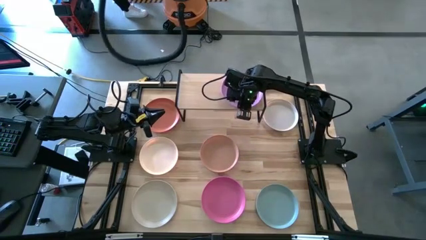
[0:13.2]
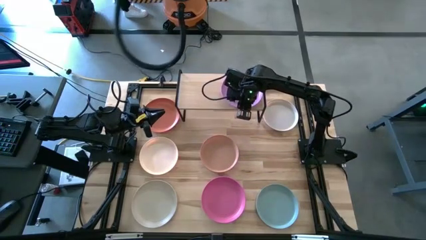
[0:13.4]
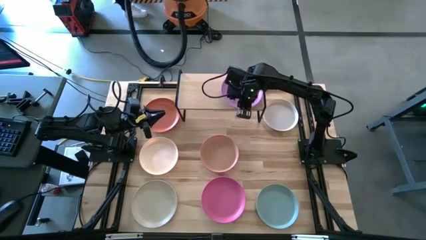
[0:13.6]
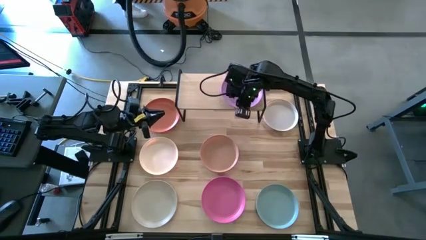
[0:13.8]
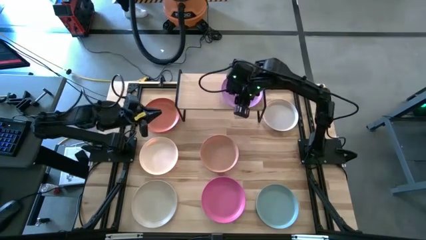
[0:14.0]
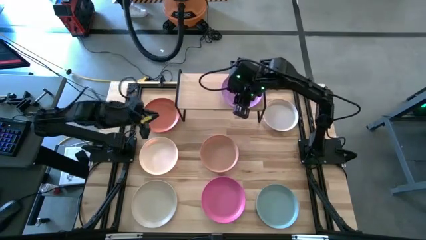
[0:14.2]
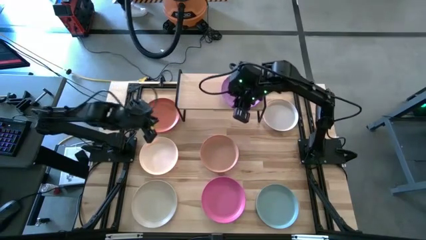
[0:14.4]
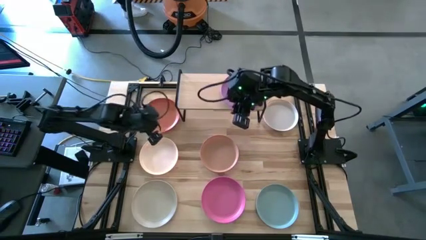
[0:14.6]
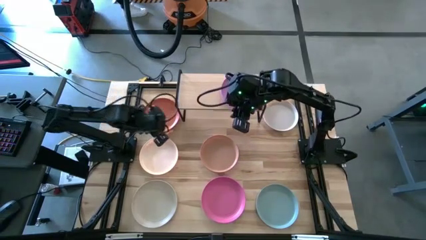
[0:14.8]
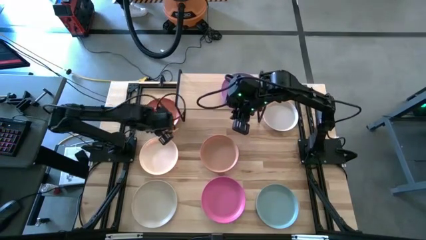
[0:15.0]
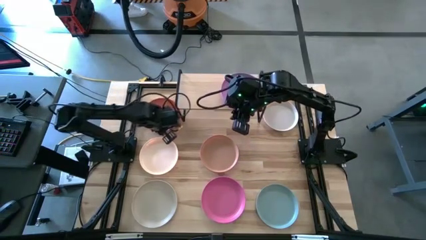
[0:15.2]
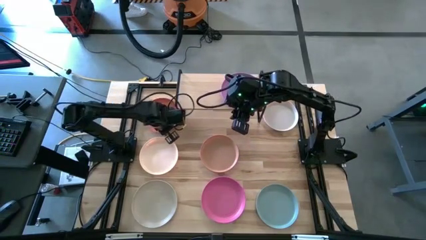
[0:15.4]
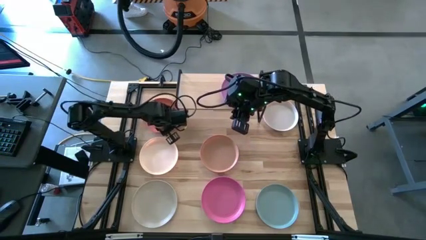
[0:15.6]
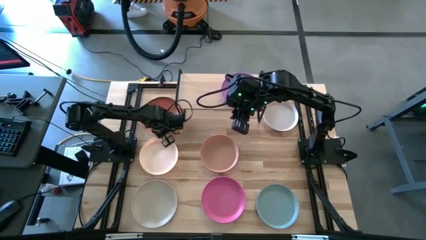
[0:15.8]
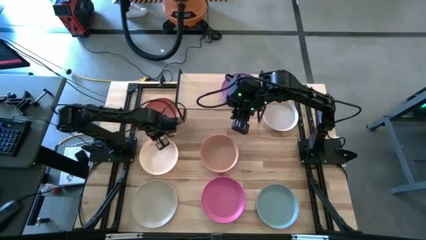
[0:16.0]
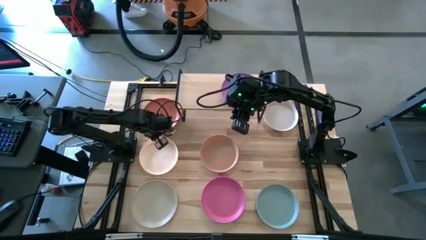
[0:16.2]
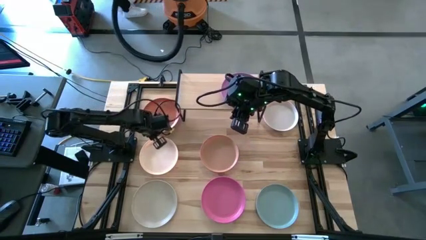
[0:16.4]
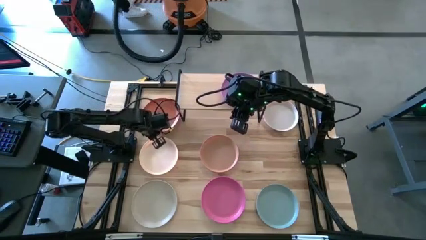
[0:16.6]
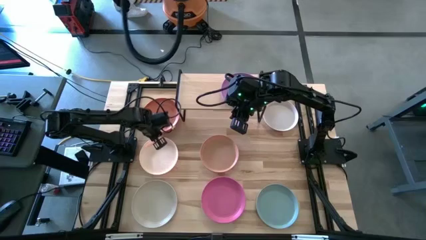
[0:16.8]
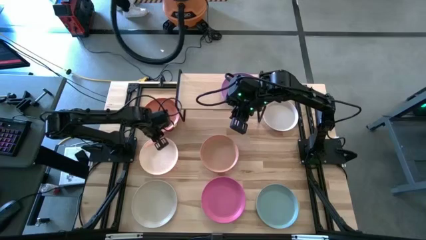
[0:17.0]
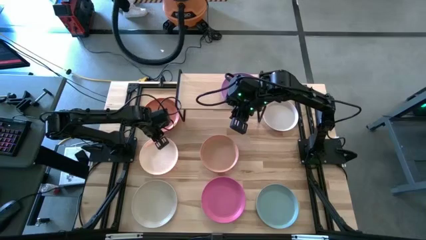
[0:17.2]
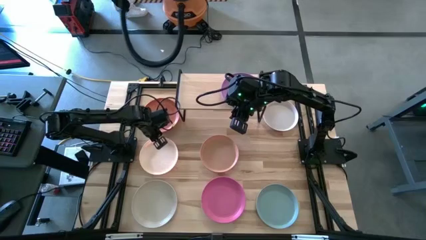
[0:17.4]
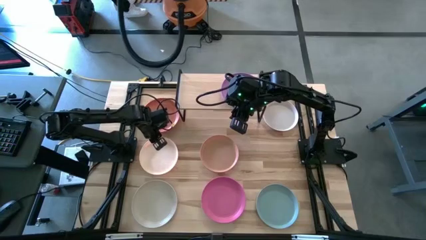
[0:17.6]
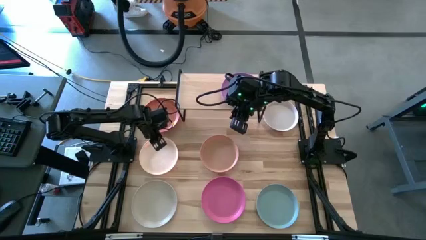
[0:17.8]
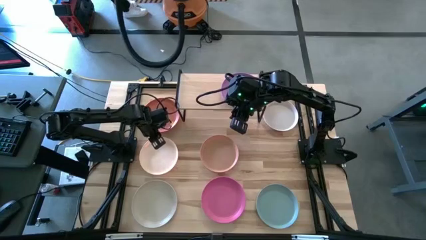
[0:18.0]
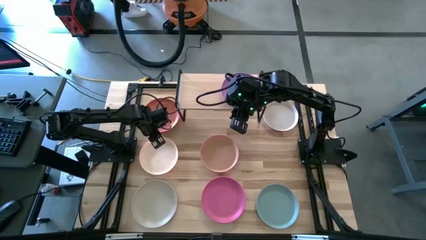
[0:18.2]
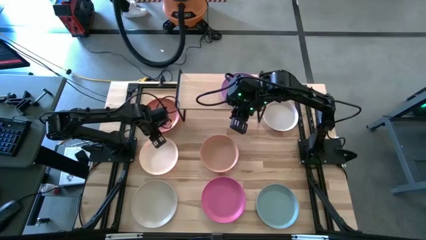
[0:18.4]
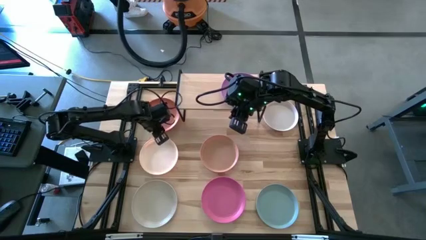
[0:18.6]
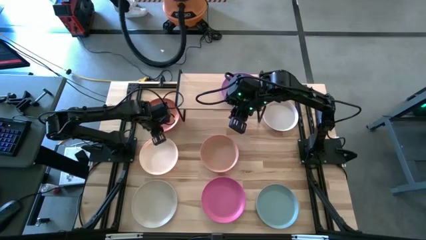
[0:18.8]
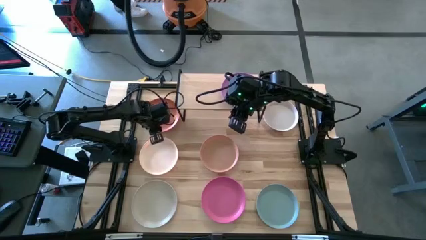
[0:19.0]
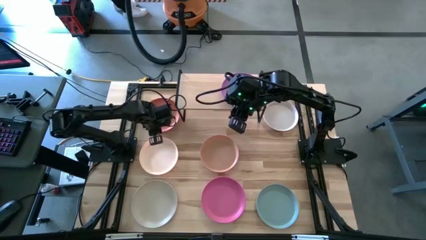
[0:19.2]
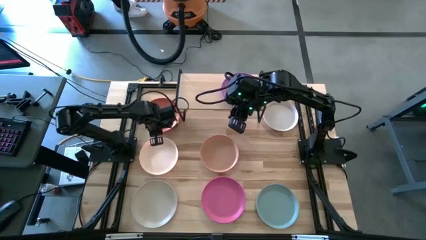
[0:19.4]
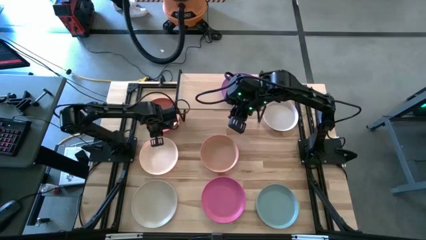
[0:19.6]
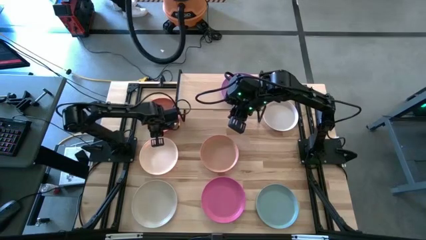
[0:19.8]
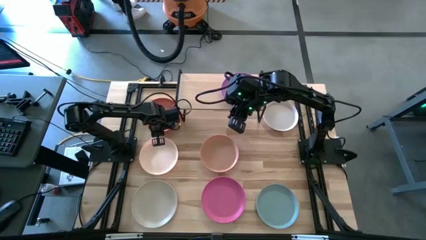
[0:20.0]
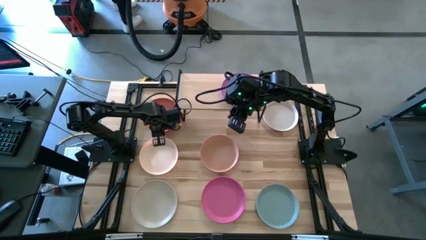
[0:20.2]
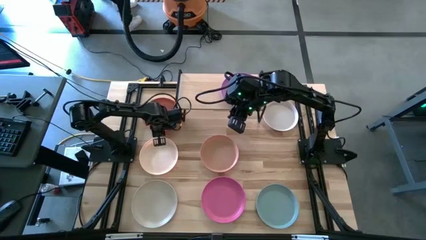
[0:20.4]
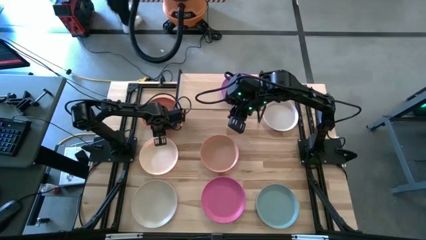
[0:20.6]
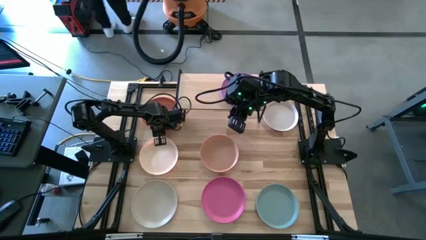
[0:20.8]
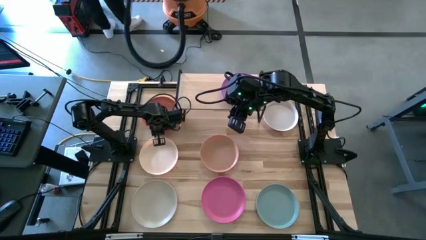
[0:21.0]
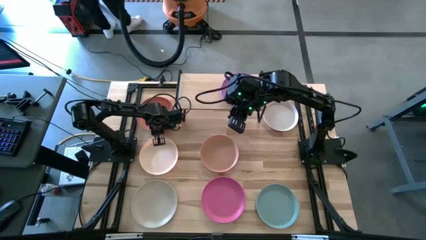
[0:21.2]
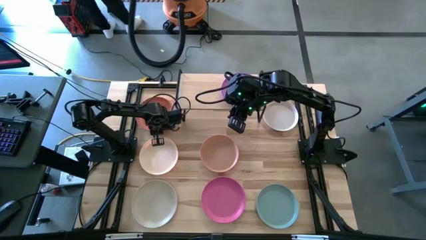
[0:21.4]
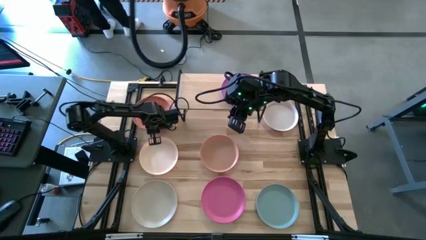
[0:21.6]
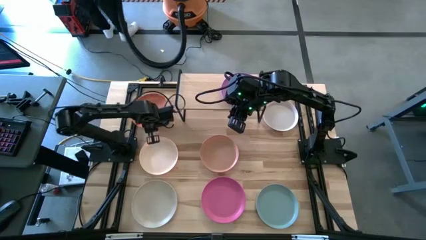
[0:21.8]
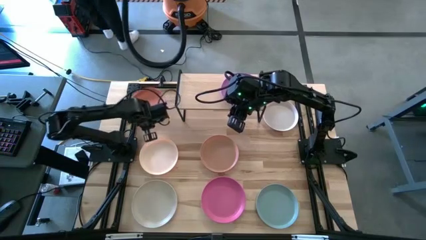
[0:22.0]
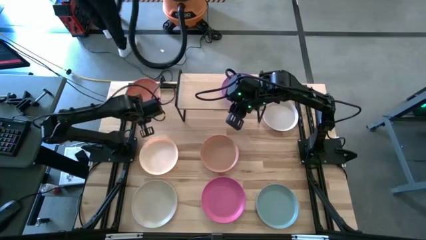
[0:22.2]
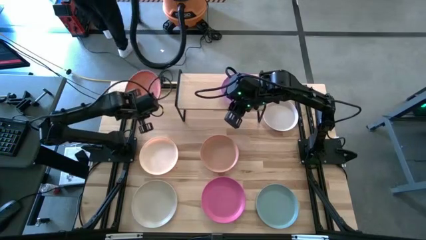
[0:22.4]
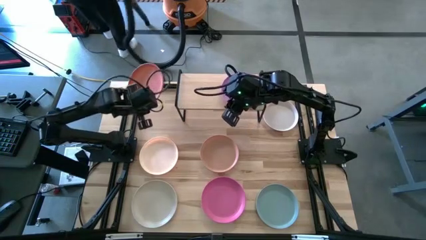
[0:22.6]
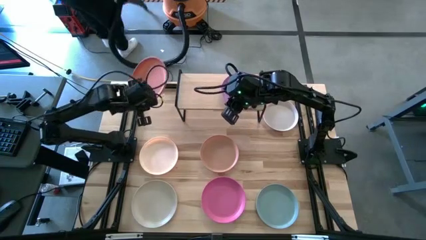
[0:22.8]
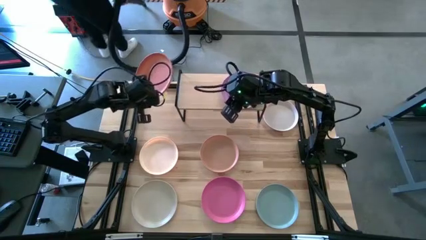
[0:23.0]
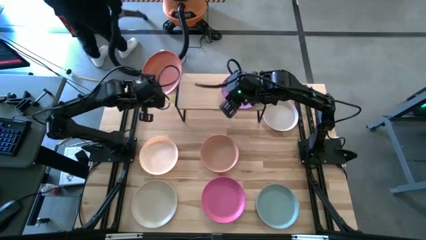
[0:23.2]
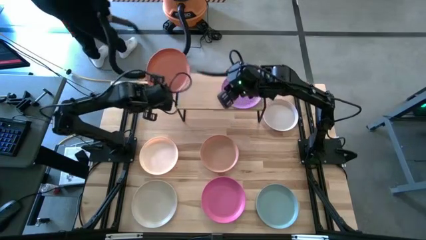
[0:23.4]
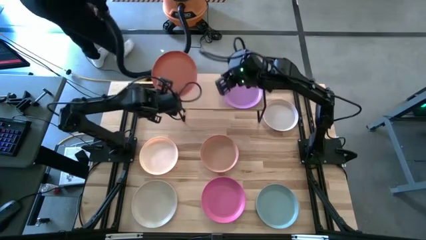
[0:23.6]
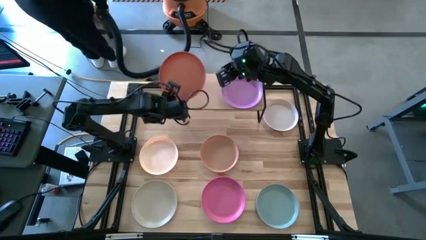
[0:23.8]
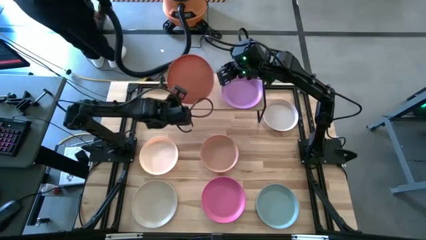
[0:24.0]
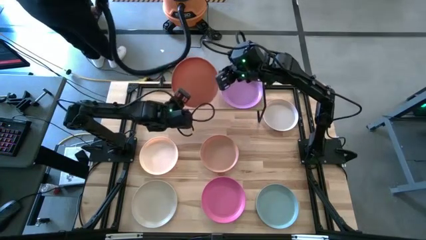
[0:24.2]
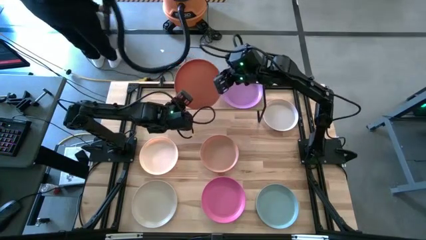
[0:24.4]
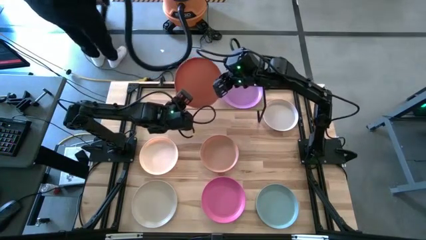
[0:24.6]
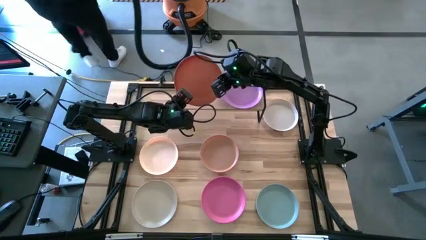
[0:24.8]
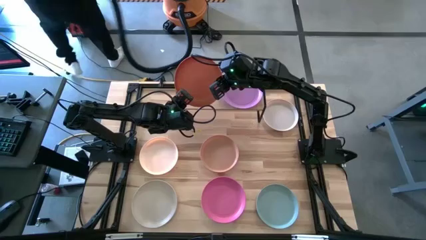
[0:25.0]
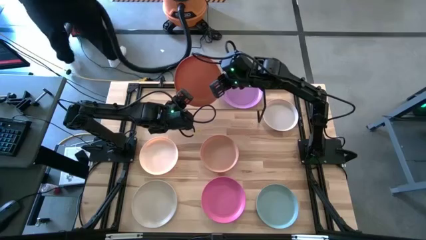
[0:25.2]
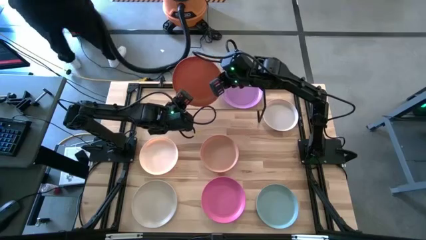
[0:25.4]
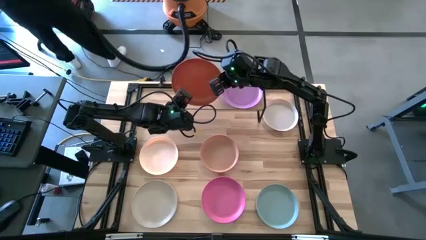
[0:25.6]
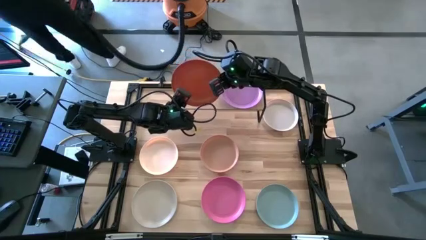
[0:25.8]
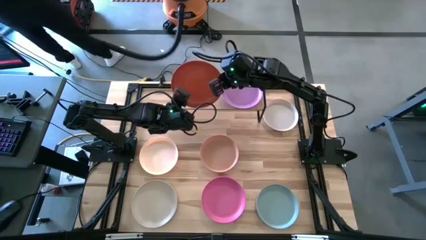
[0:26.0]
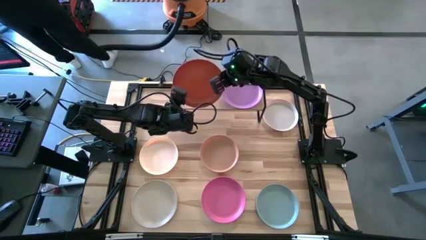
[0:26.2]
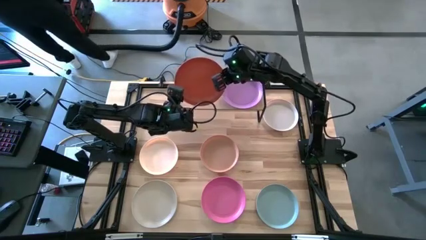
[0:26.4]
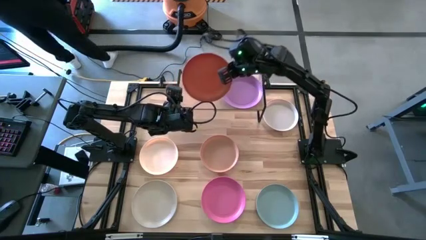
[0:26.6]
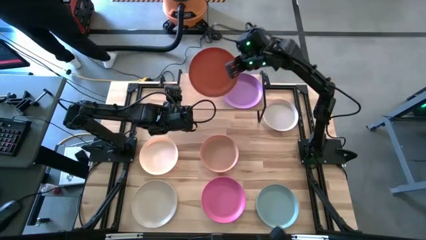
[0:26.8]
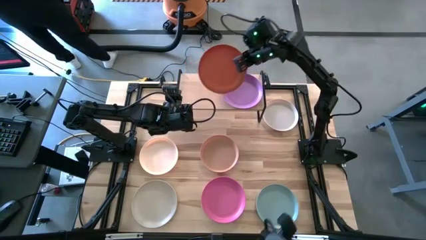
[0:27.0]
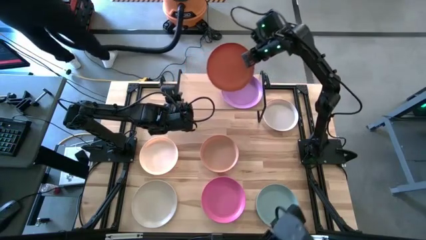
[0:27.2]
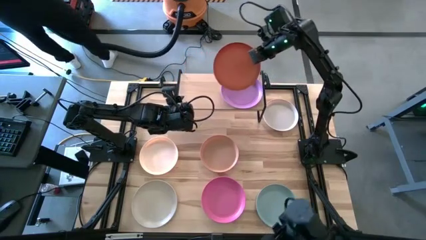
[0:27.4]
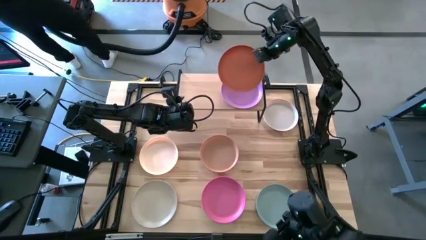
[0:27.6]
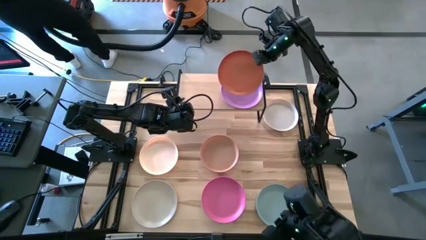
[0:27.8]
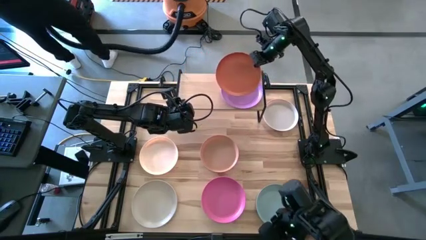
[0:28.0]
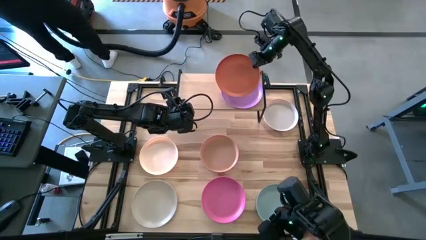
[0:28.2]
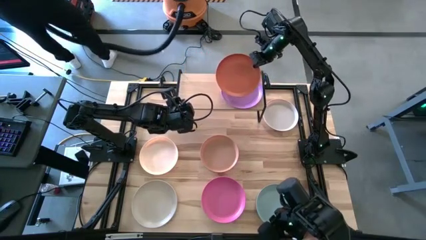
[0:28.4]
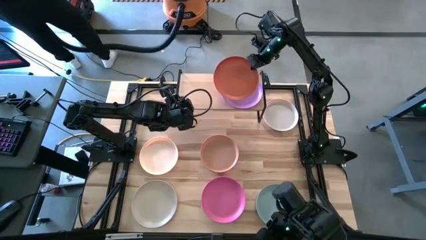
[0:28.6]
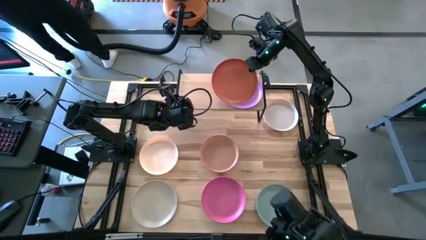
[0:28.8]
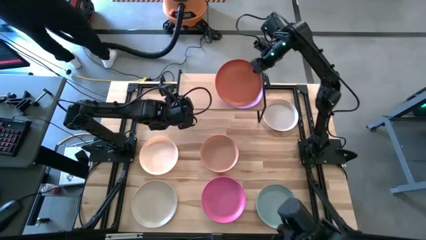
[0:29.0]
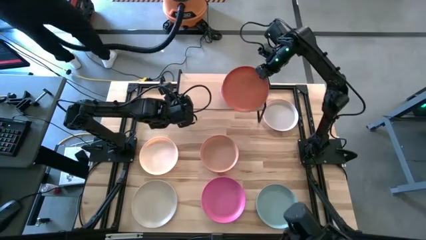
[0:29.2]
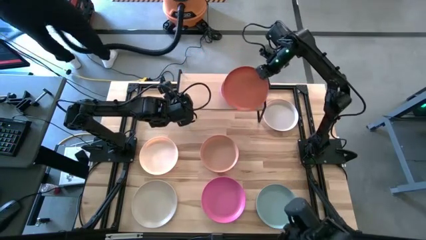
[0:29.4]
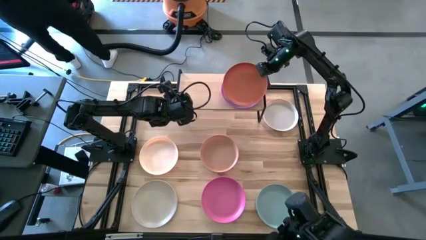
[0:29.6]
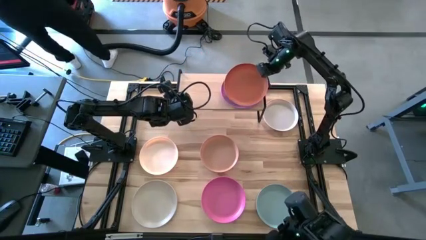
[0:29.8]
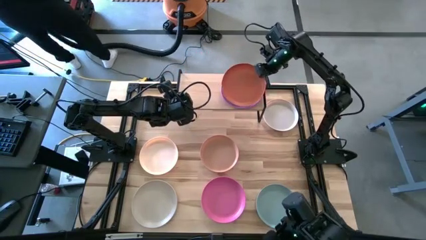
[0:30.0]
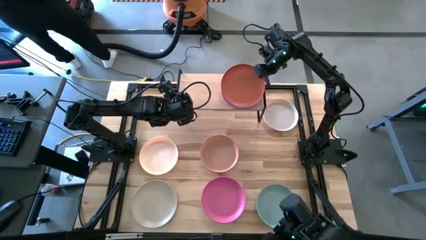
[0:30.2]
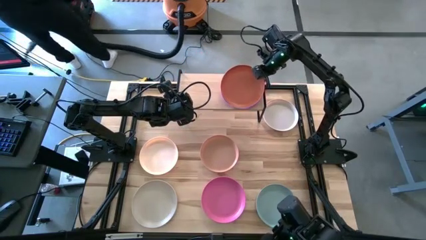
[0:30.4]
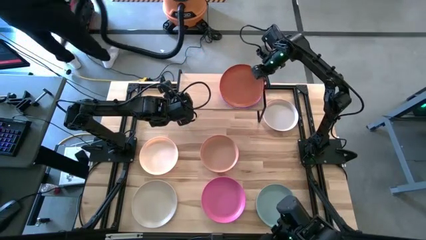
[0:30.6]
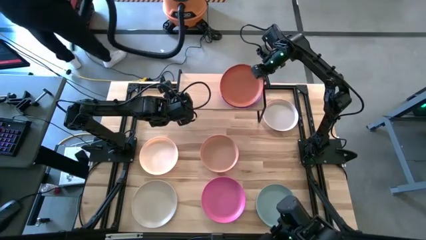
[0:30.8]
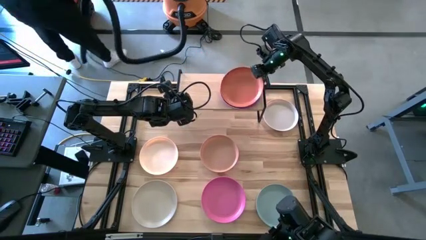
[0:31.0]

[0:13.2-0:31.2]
Task: Place and stack plates onto a shelf
Stack the orange plate on top of the violet plate
